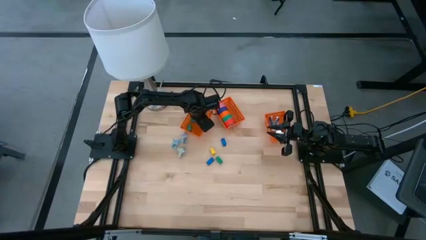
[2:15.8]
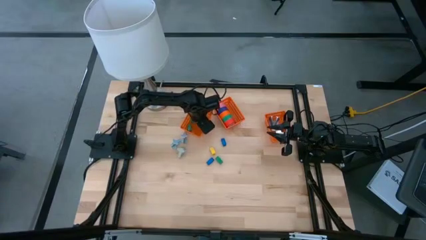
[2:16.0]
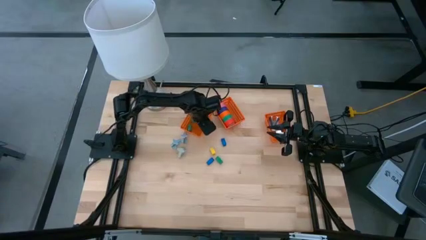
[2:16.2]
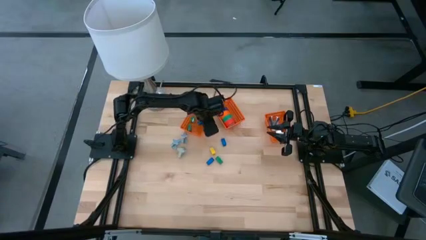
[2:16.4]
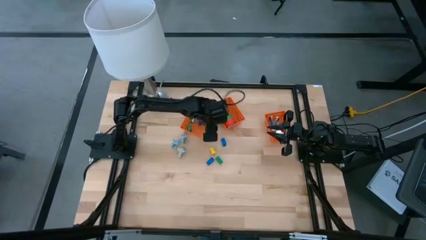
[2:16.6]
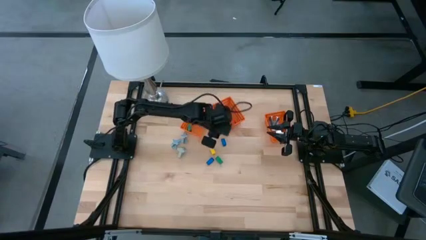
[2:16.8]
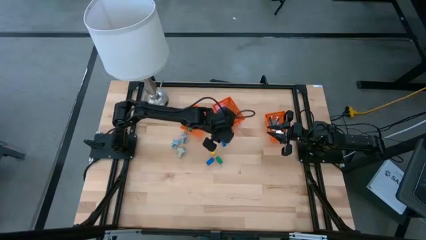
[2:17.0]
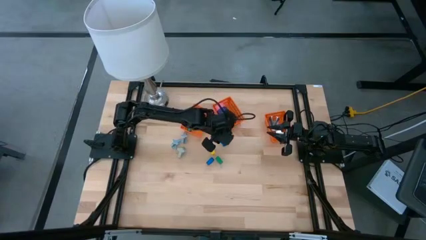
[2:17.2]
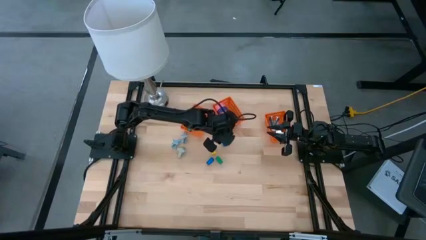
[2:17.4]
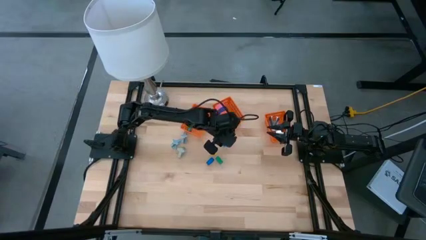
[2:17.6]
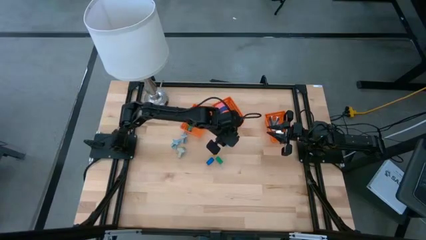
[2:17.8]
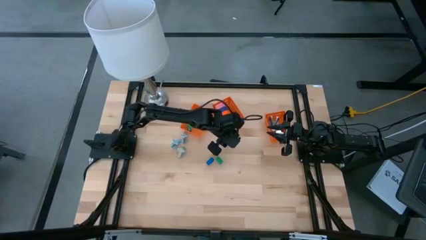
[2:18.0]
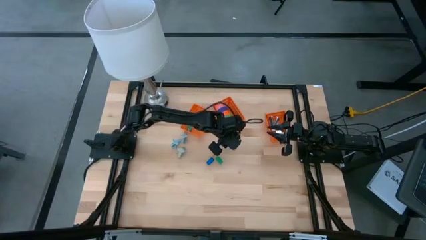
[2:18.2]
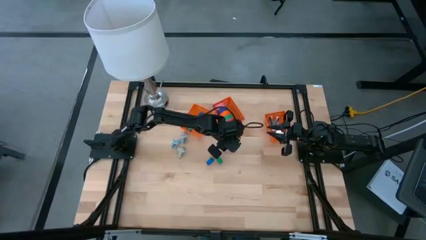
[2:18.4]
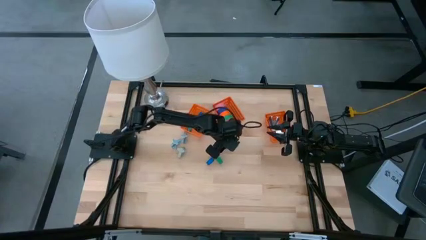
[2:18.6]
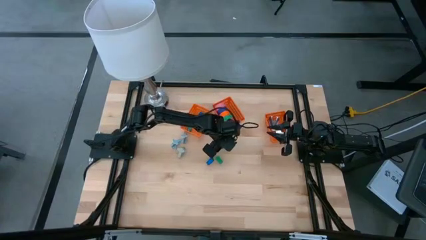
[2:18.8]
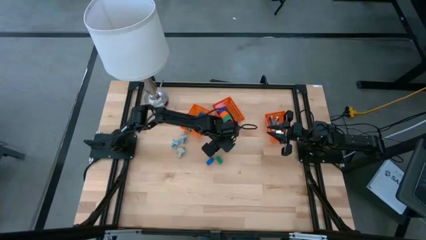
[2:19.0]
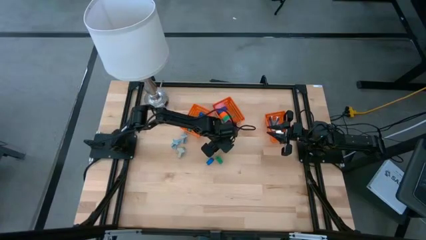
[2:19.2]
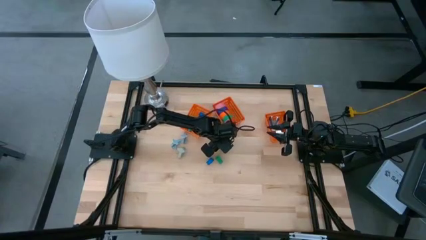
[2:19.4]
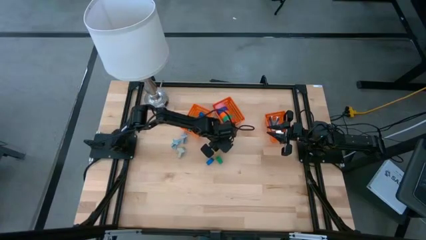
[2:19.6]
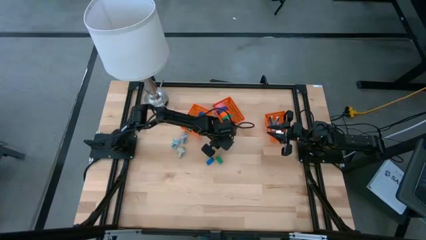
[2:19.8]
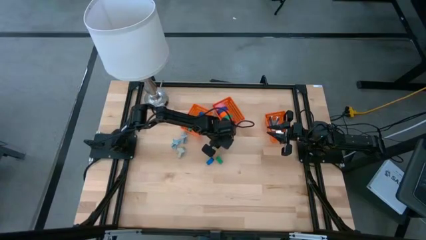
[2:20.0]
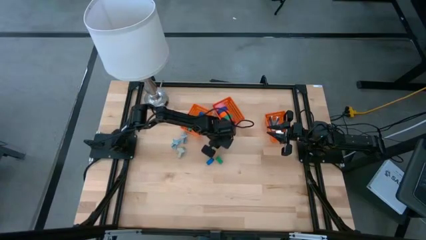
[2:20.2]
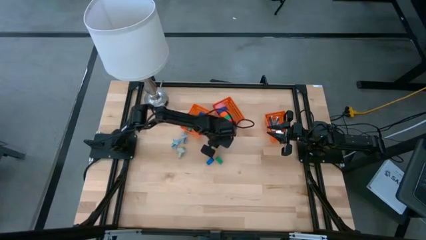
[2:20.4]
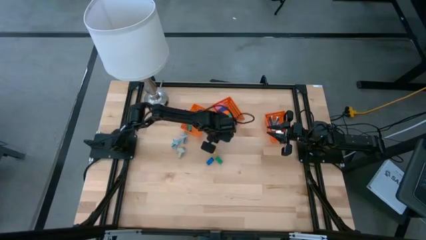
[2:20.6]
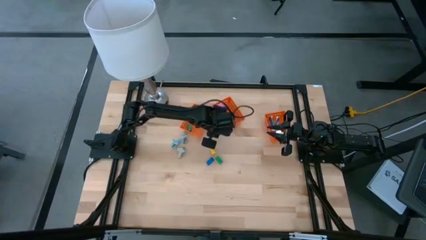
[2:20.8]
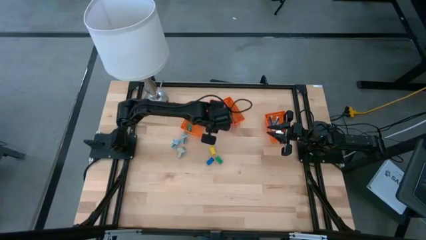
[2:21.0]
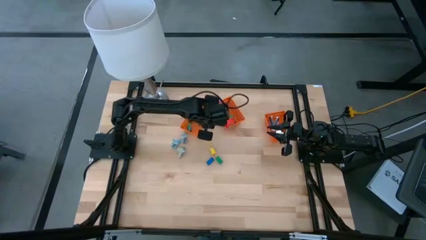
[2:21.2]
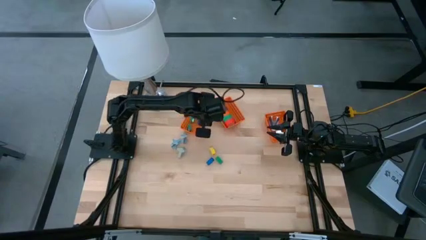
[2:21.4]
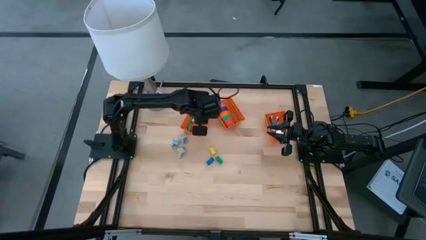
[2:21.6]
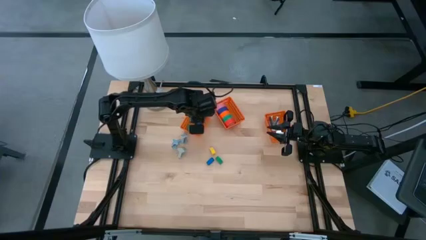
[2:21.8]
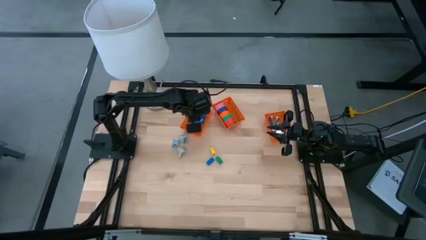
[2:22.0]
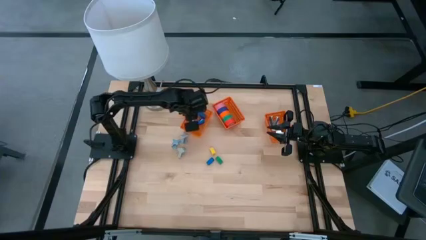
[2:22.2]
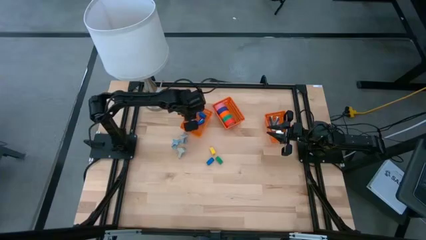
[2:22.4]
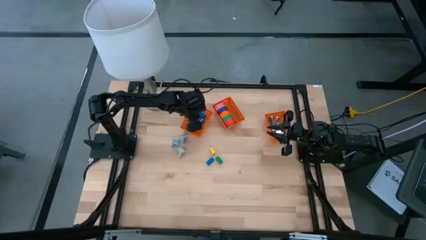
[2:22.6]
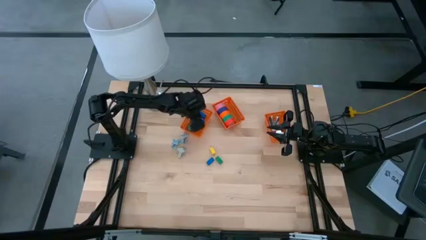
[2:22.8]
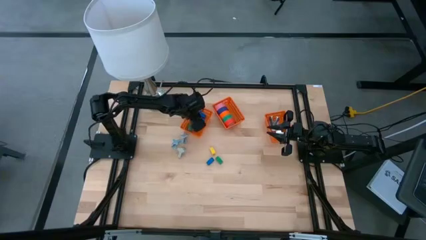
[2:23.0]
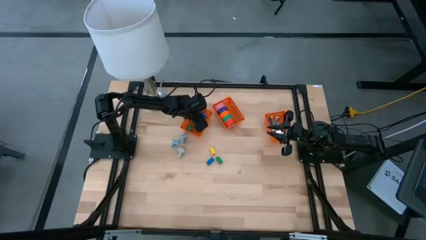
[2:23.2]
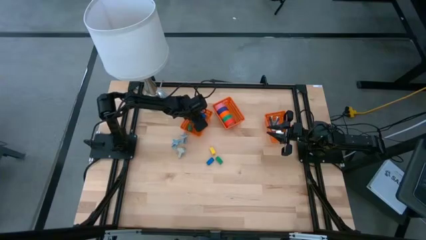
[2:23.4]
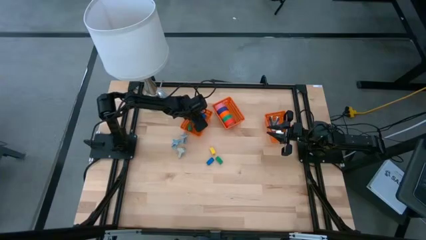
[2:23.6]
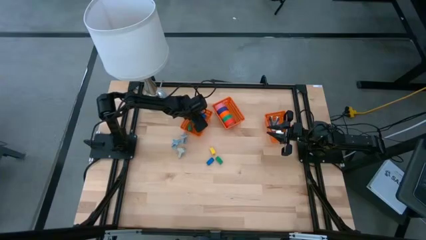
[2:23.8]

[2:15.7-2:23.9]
Task: Pick and place Stapler, Stapler remover, tape
Put the blue stapler into the left orange bin

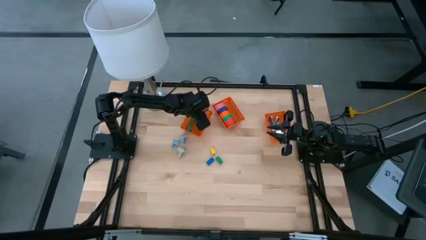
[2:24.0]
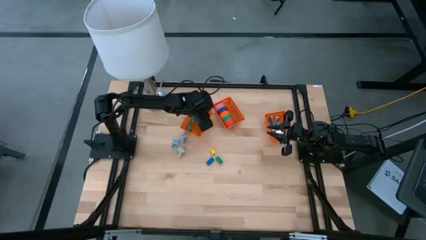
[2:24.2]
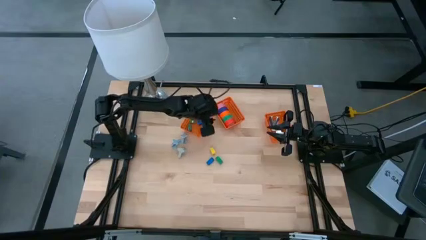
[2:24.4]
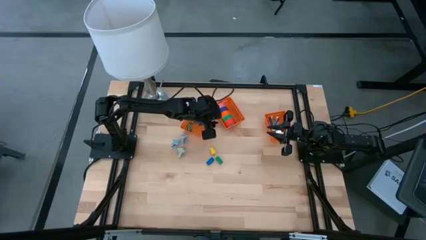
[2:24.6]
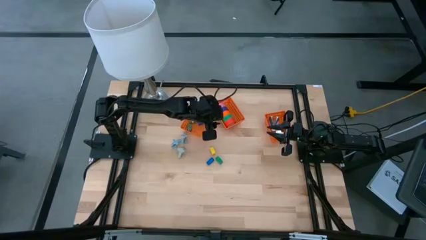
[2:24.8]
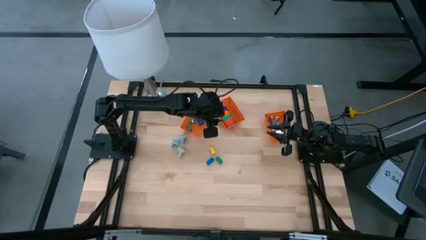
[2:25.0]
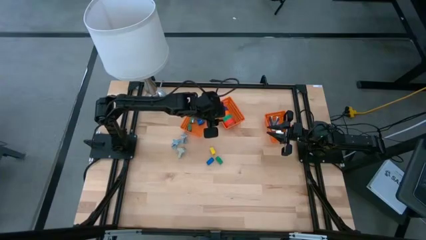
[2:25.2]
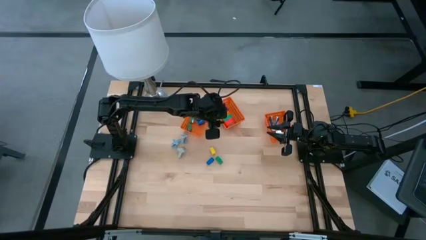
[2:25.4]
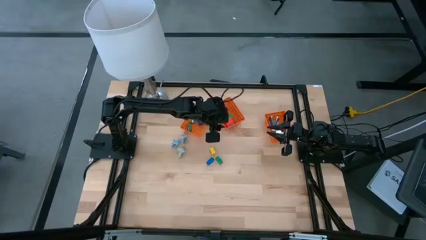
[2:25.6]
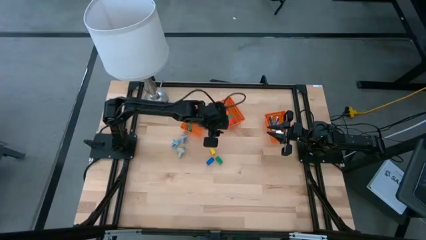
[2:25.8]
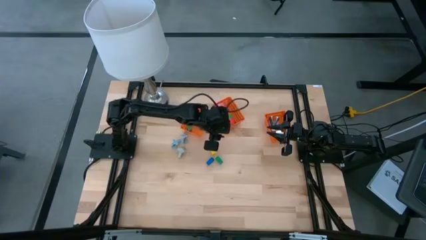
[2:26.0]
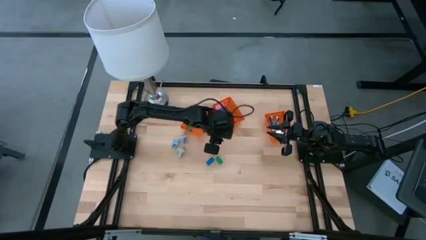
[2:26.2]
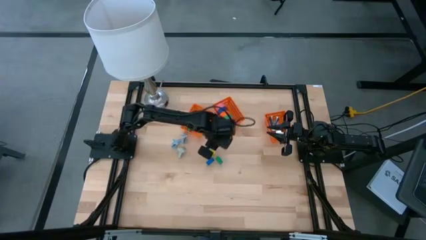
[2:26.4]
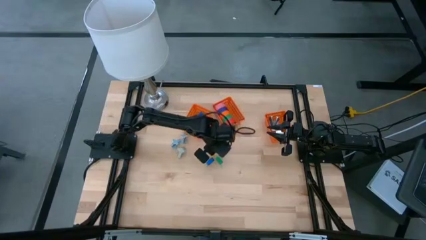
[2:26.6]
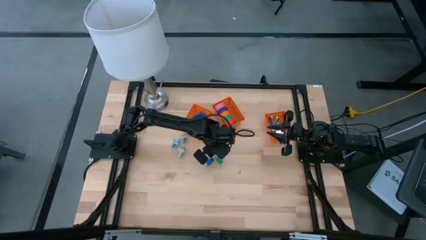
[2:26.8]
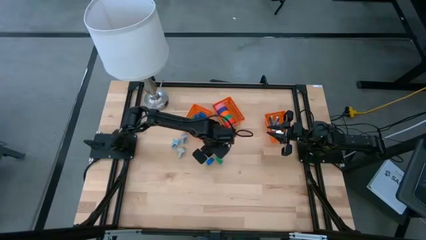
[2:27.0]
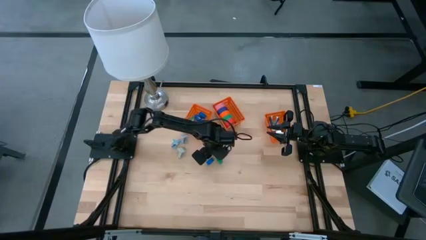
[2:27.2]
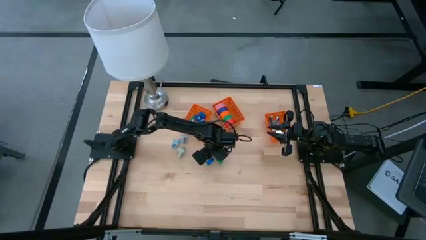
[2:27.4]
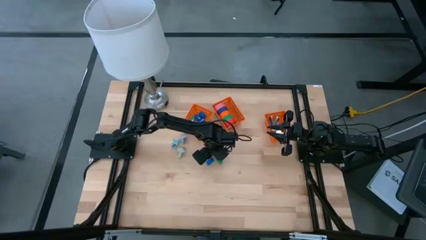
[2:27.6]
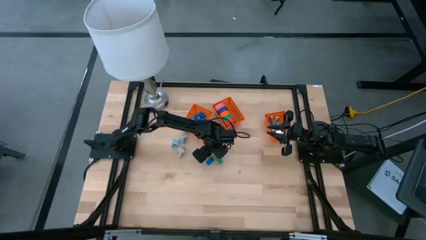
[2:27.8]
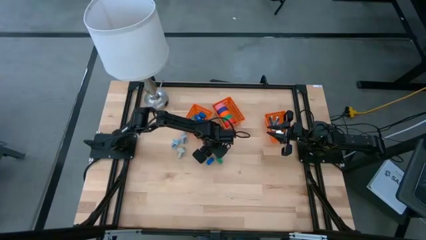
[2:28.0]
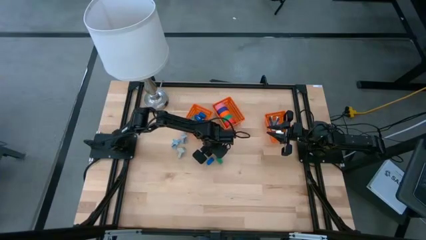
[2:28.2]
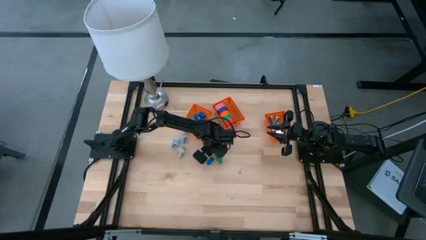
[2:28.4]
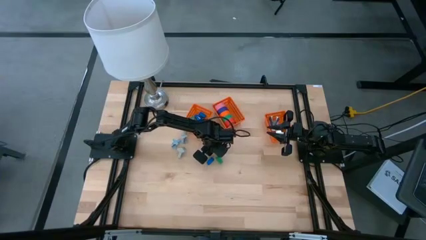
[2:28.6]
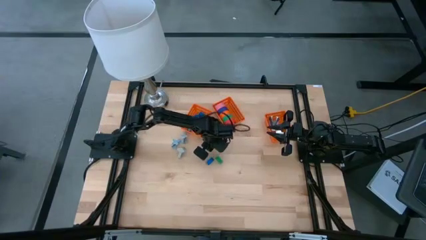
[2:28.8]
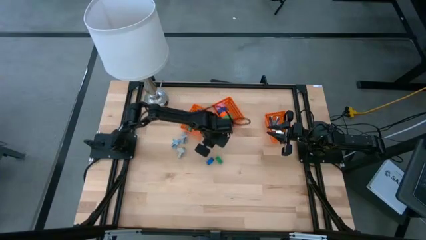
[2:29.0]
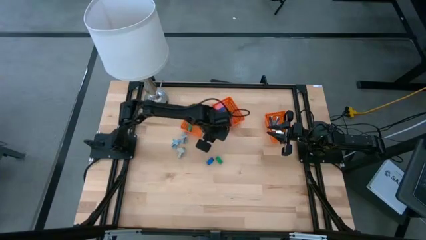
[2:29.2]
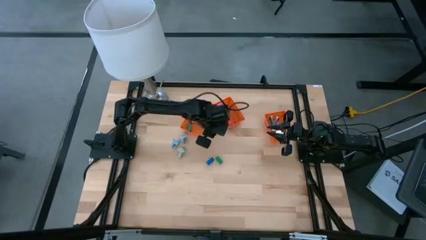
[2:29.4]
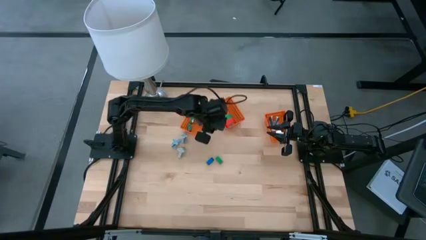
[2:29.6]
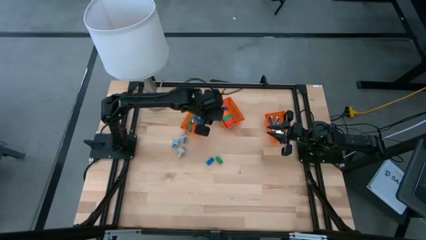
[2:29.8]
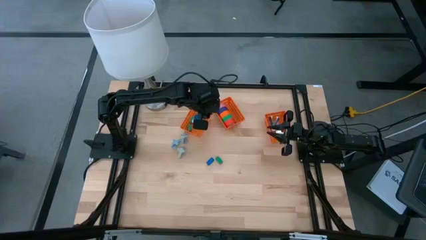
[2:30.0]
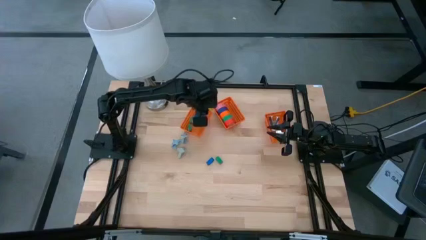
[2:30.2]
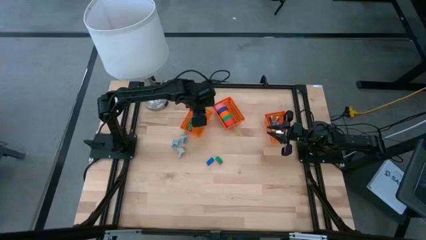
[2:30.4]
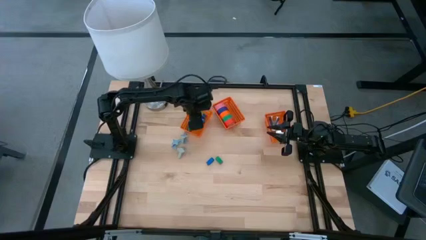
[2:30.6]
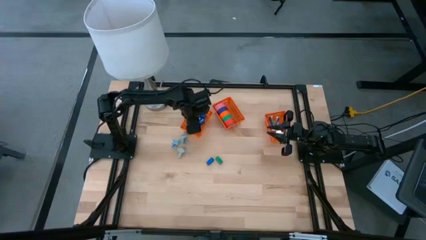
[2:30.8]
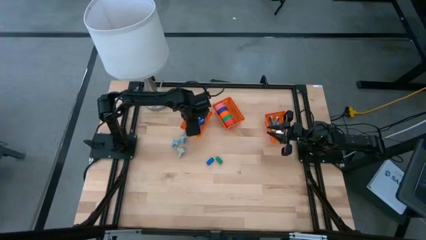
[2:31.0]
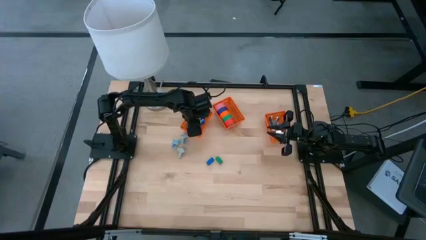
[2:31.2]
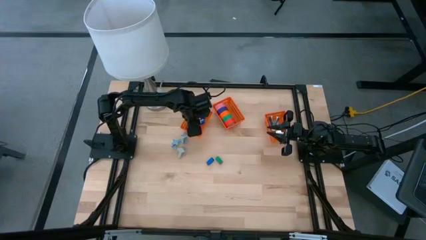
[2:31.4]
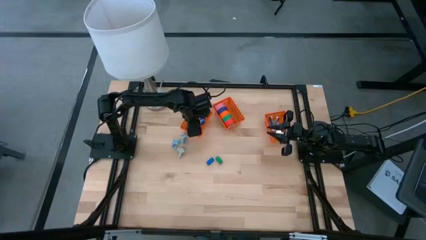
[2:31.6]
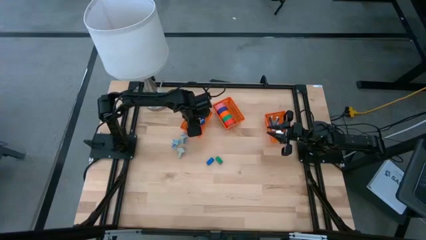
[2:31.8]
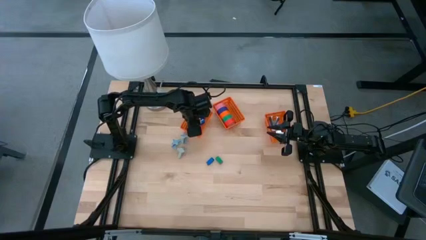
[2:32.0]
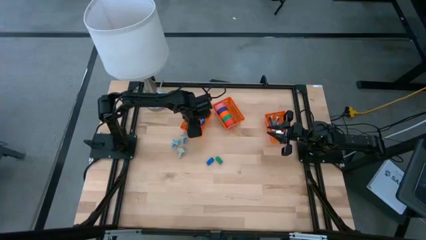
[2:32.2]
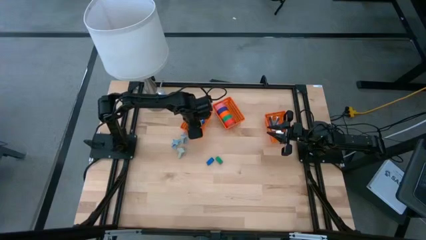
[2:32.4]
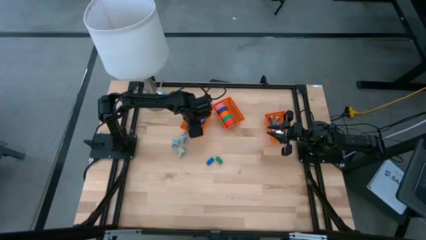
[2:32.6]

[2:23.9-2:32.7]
Put the yellow stapler into the left orange bin
